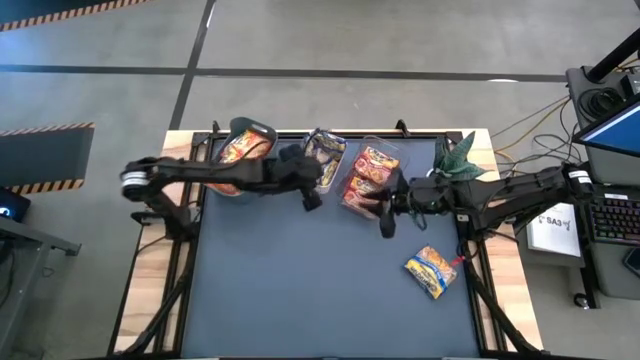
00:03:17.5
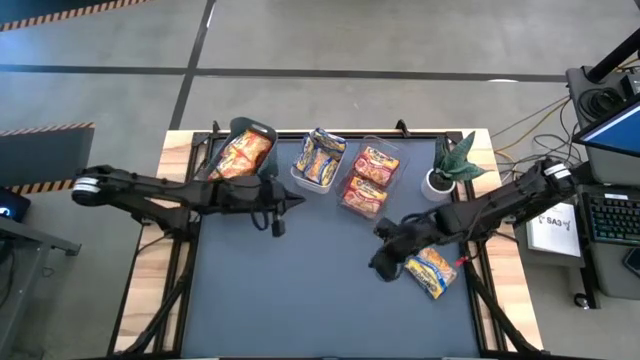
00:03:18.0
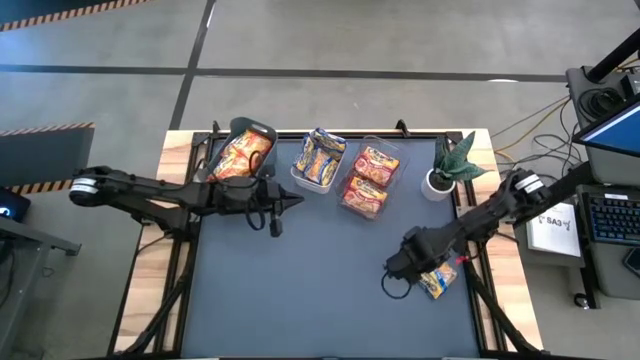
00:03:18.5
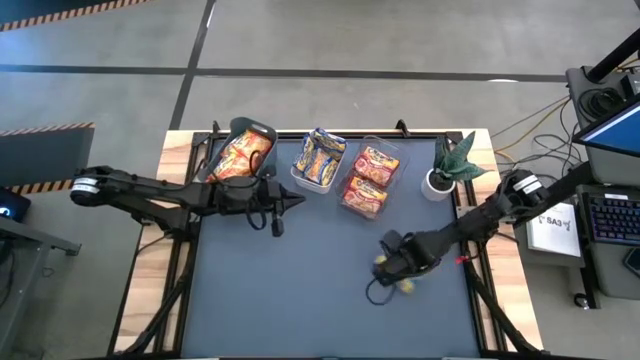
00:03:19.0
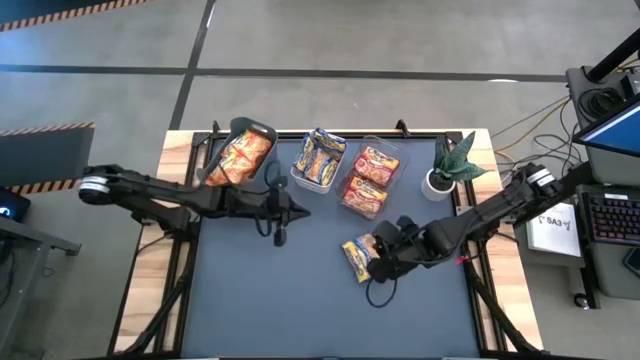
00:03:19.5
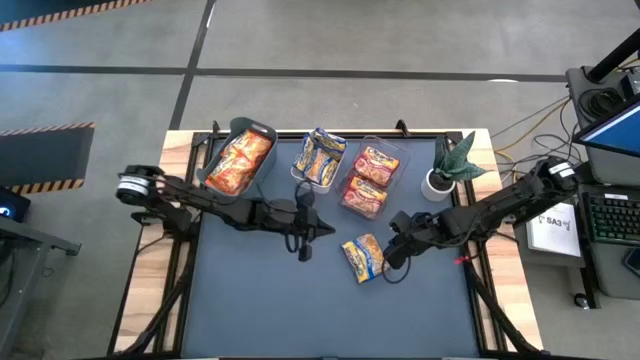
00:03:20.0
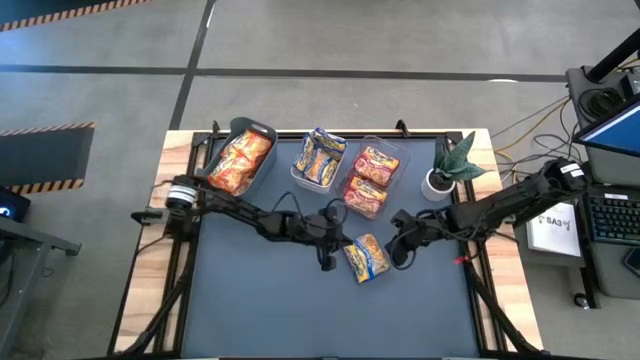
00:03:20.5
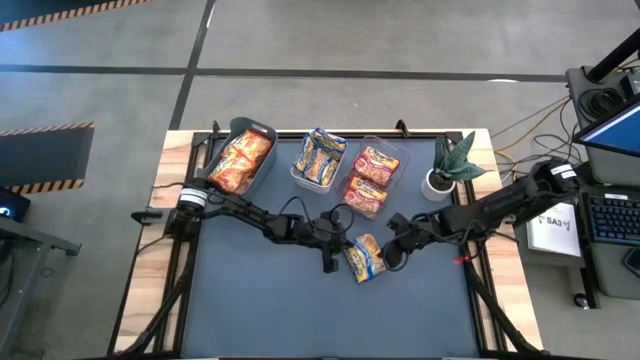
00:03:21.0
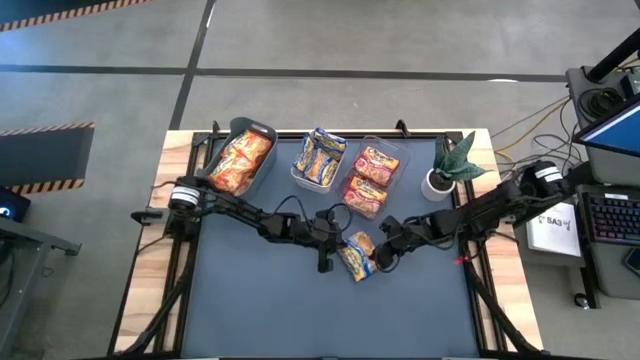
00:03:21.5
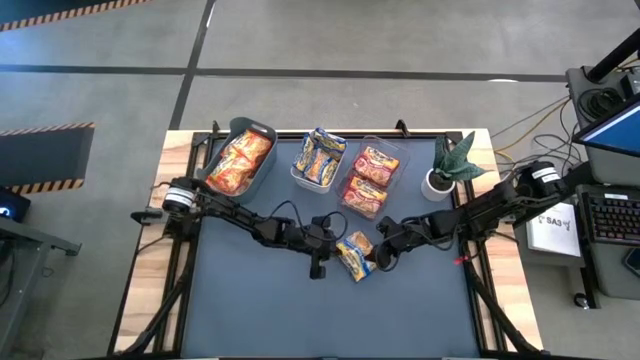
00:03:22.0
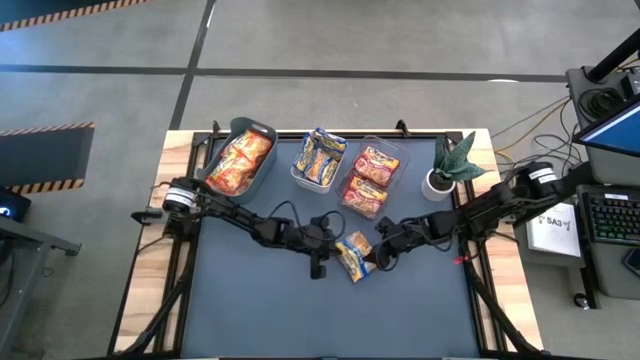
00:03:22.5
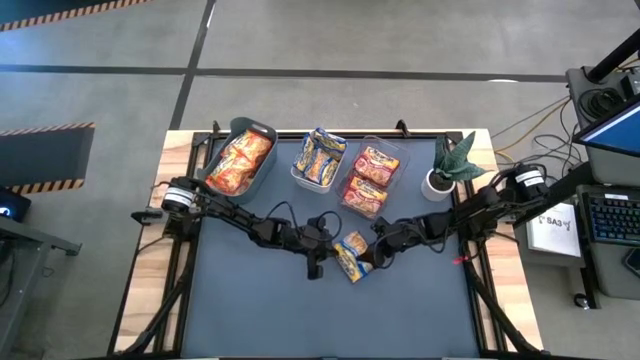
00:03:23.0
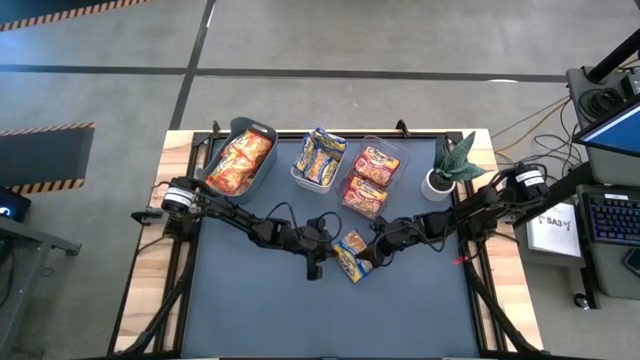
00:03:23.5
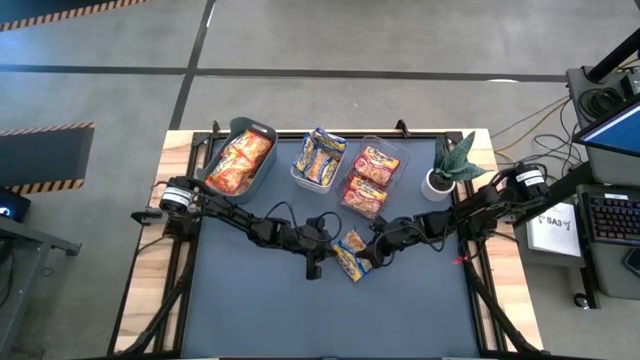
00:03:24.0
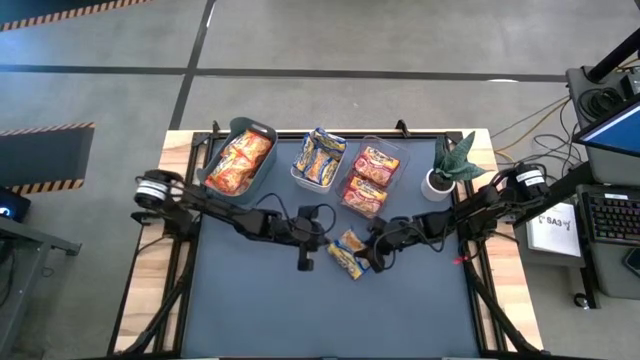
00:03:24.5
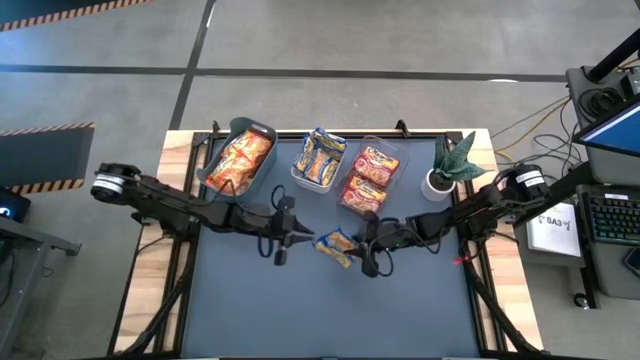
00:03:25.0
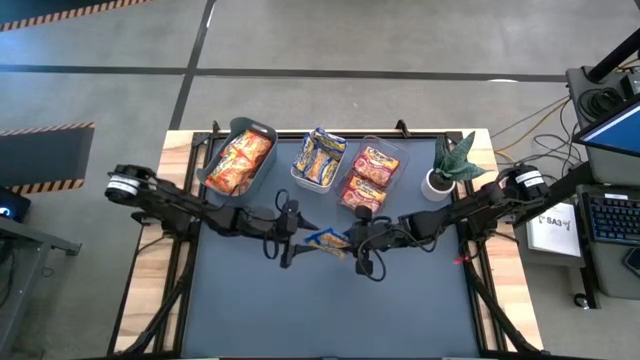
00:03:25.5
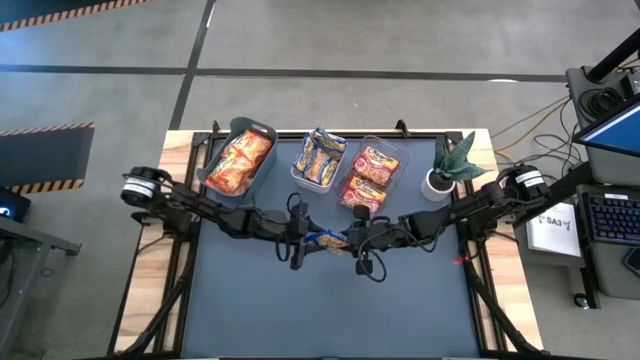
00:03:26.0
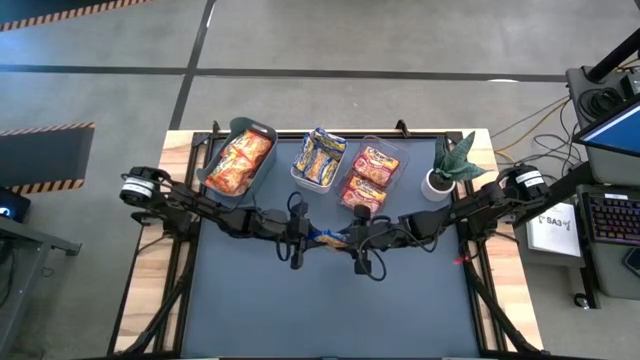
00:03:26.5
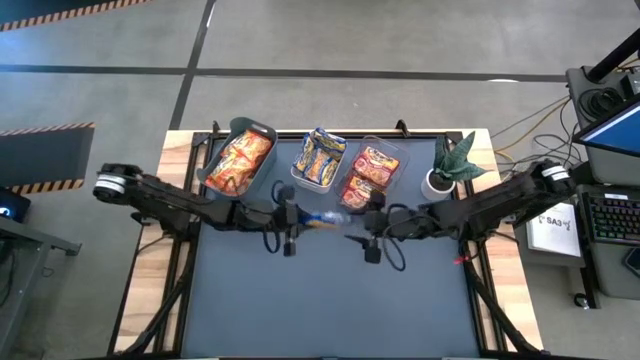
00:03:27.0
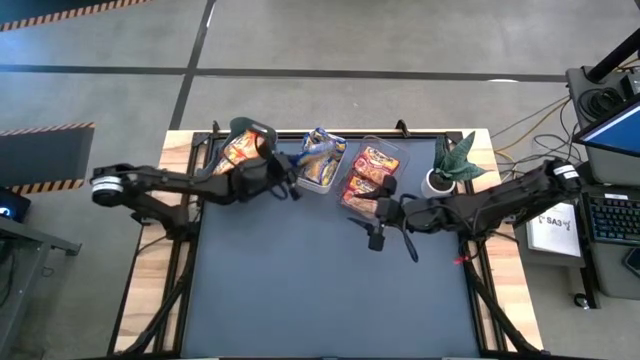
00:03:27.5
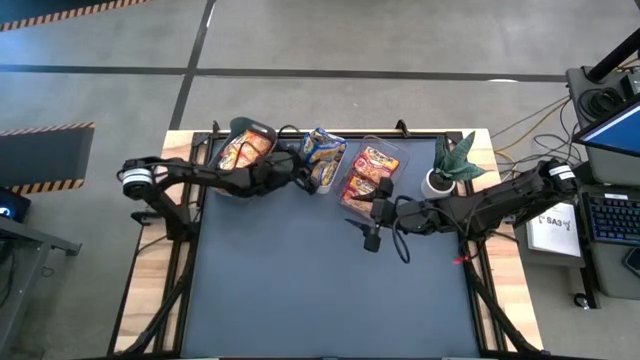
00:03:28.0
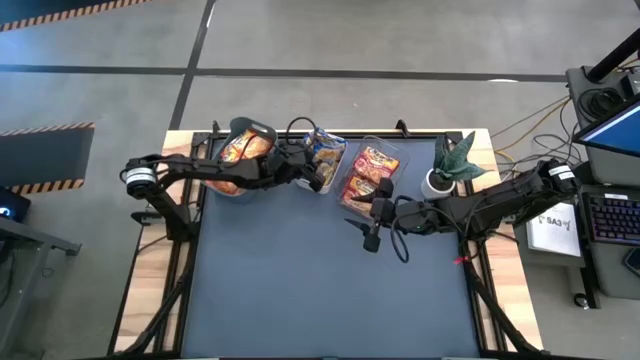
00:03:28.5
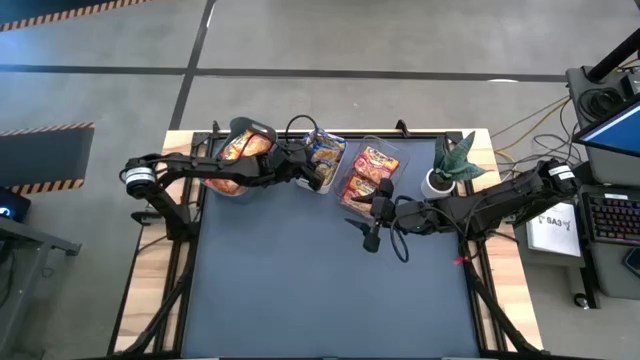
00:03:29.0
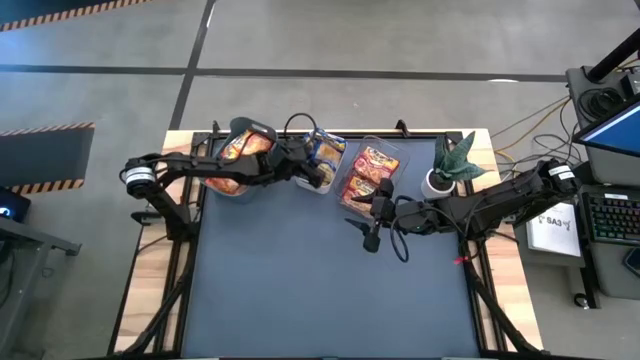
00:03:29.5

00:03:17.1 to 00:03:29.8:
Task: Sort Maruchan noodles
Put the blue noodle pack into the white bin

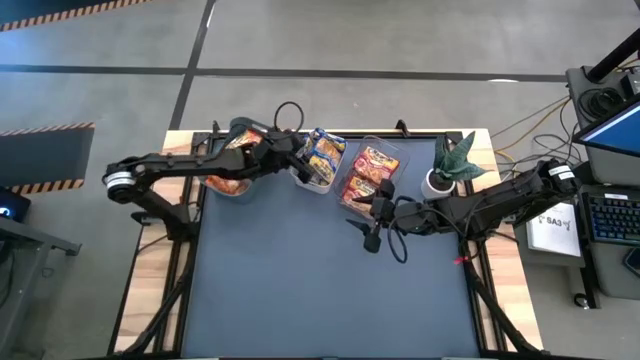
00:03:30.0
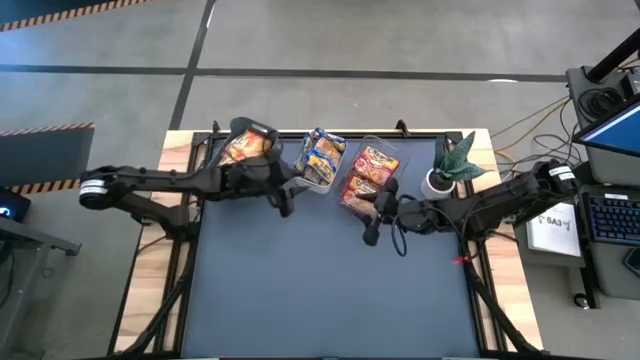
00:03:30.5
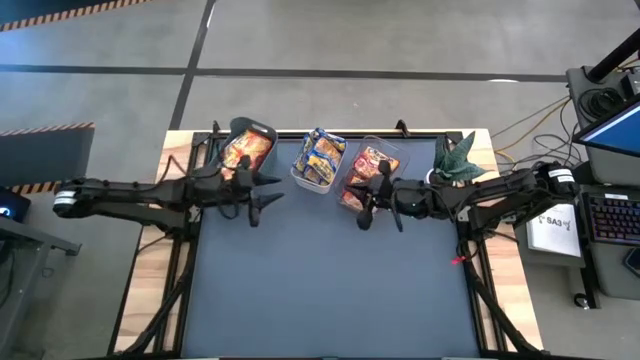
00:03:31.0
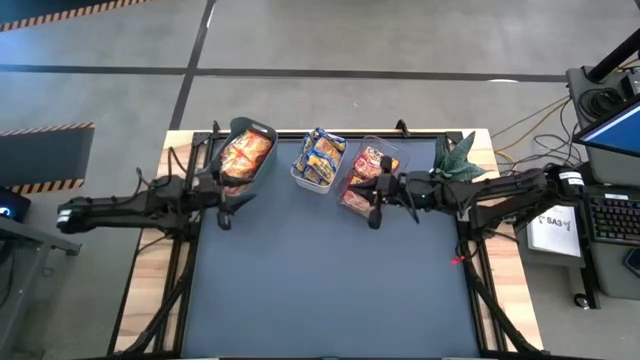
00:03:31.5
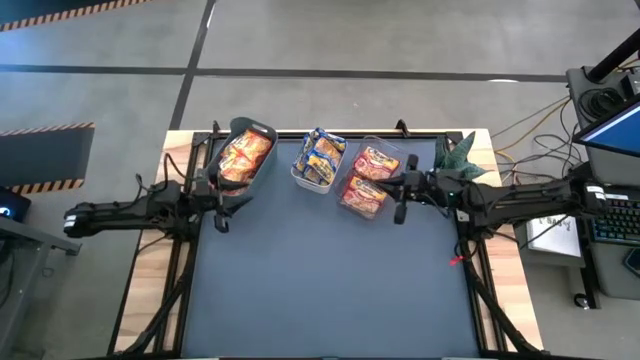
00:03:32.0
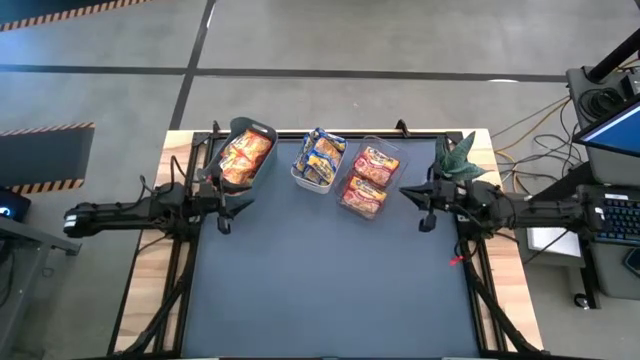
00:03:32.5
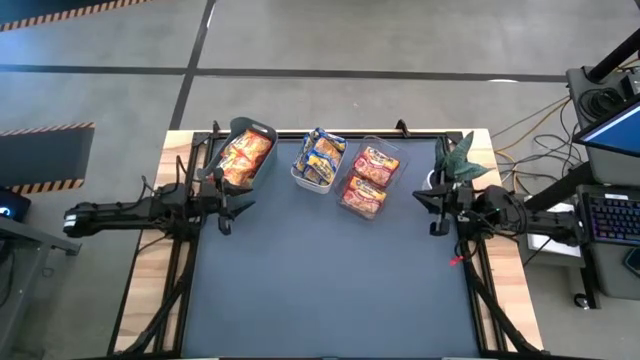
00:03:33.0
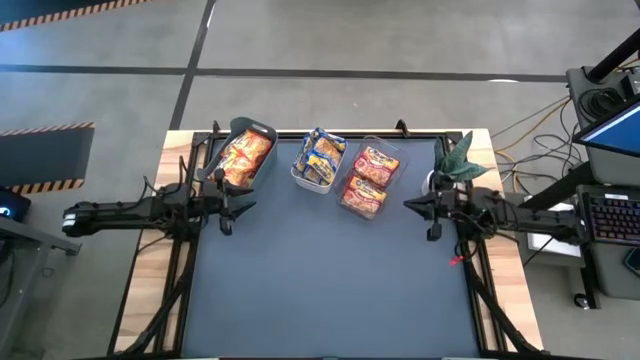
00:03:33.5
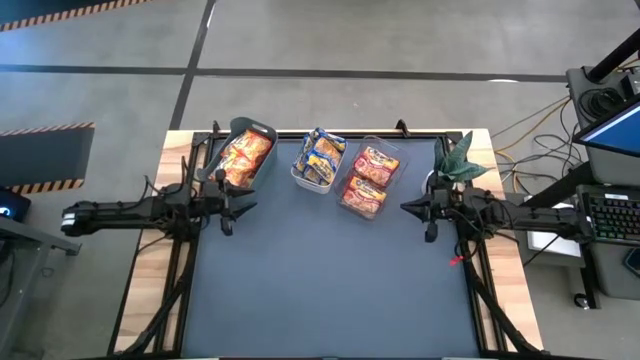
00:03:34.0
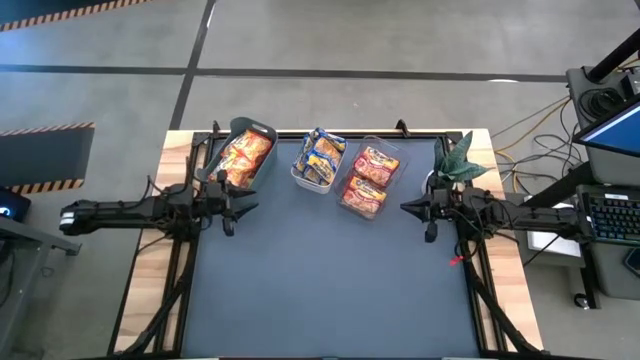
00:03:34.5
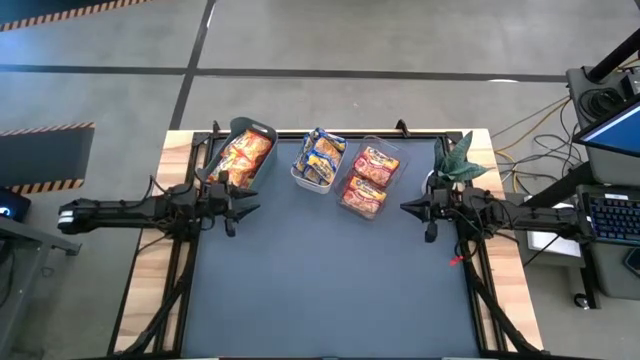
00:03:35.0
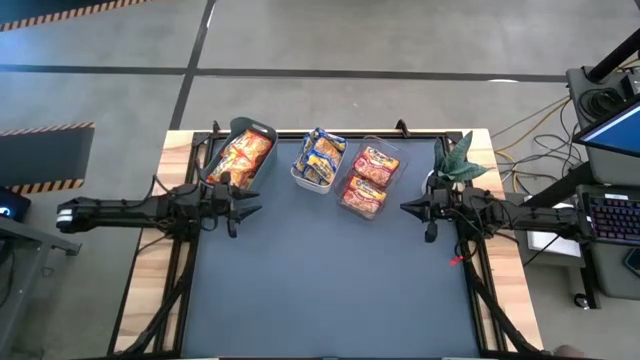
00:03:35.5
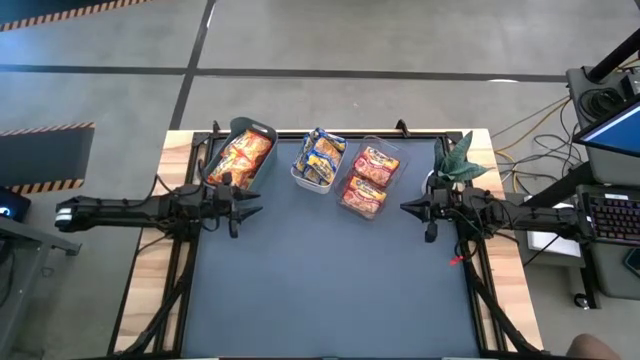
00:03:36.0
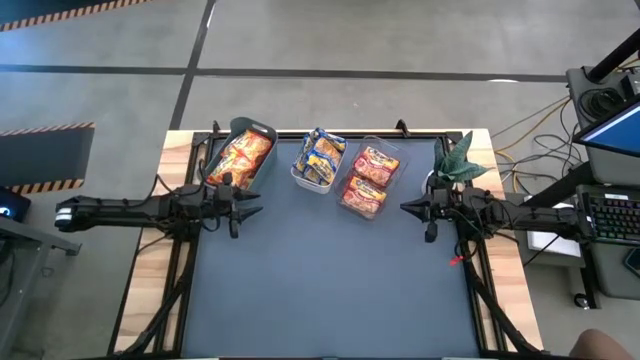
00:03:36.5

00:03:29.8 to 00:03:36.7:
Return to Home Position

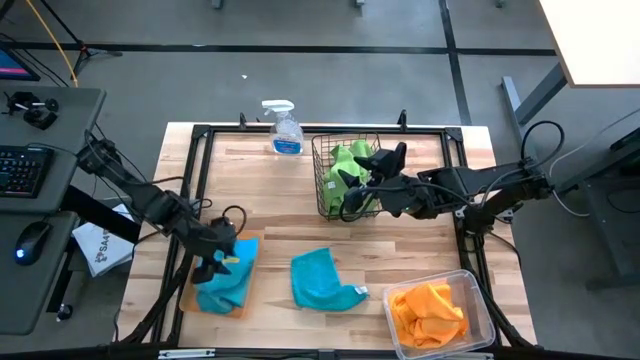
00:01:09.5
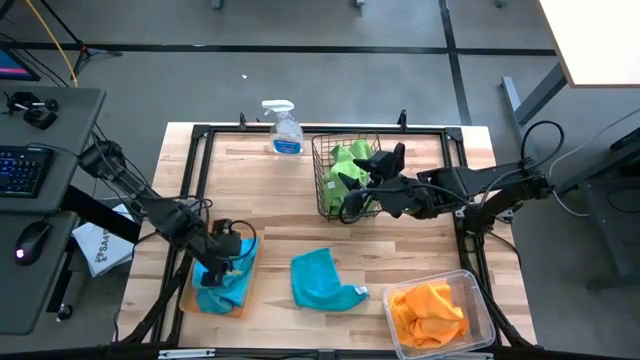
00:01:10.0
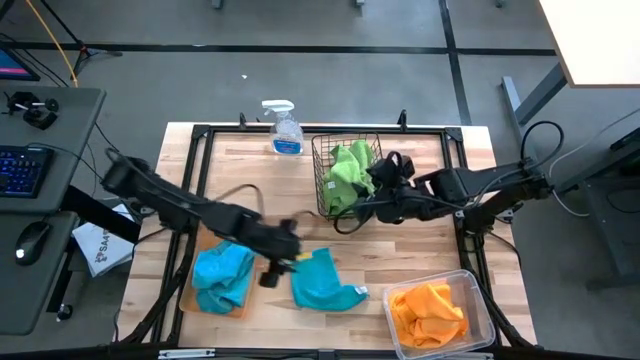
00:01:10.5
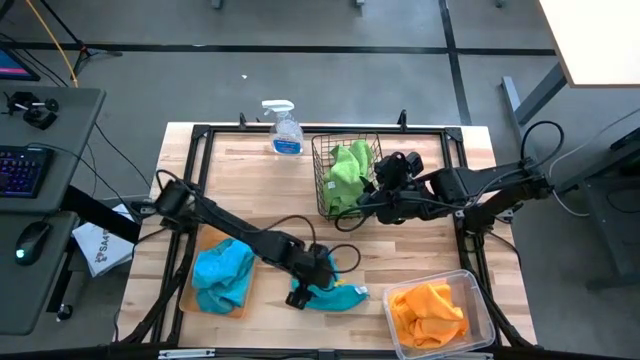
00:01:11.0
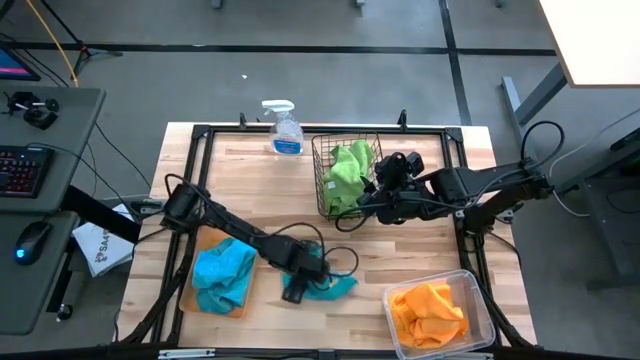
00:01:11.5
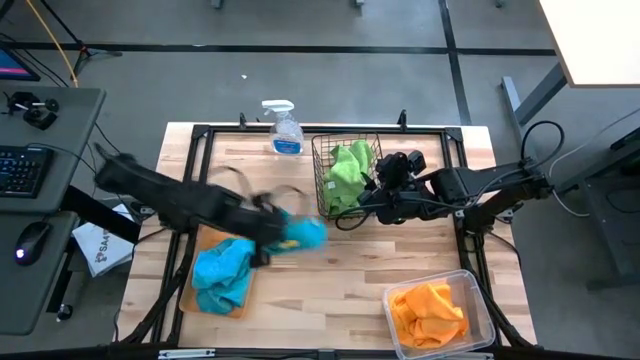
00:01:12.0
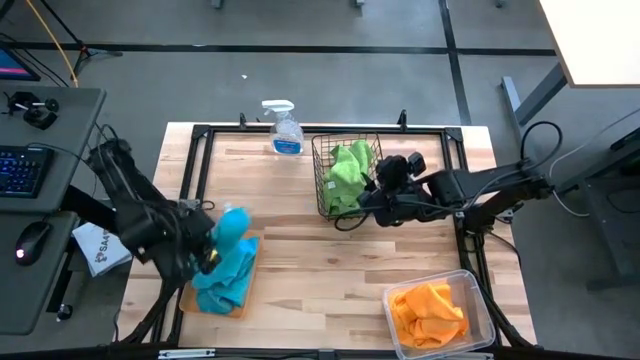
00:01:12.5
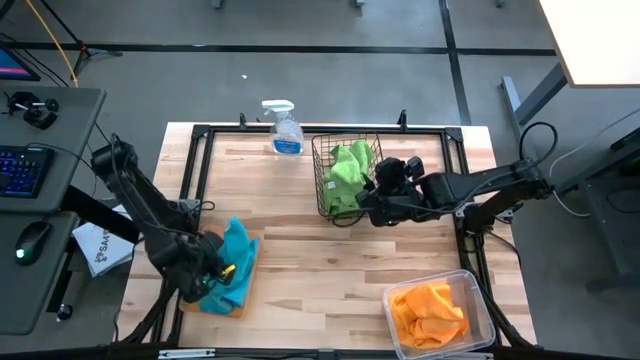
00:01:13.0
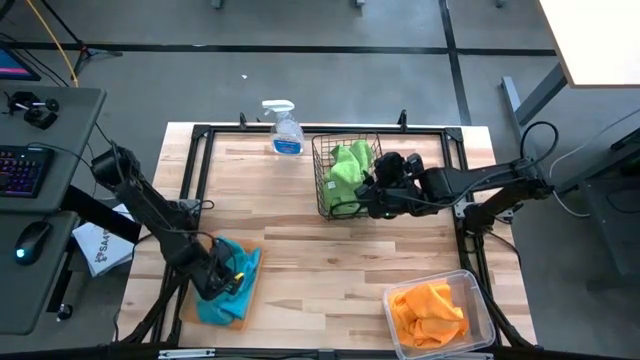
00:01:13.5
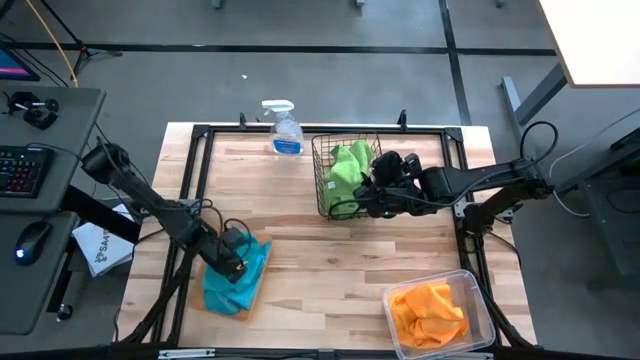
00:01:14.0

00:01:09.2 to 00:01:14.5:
Task: Sort microfiber towel by color & place in baskets
Put the blue microfiber cloth into the orange bin
